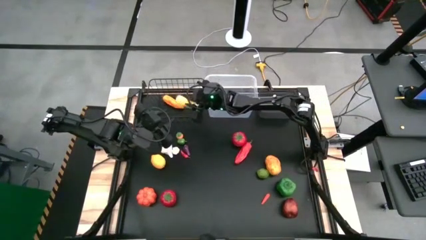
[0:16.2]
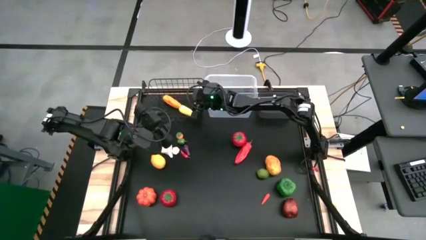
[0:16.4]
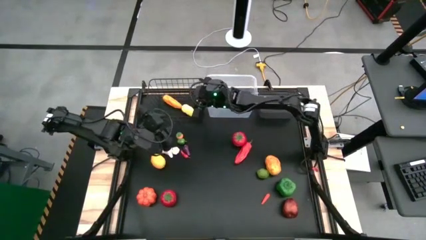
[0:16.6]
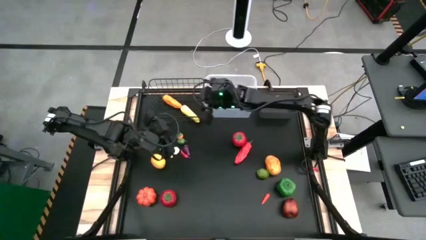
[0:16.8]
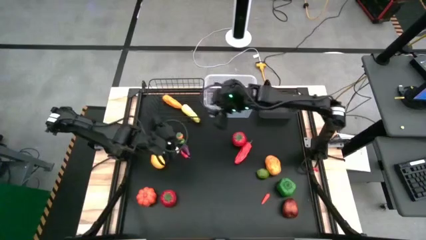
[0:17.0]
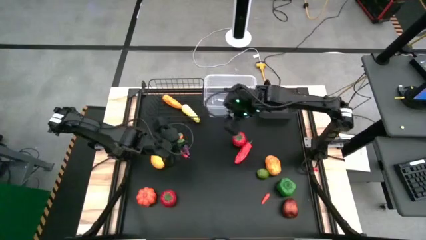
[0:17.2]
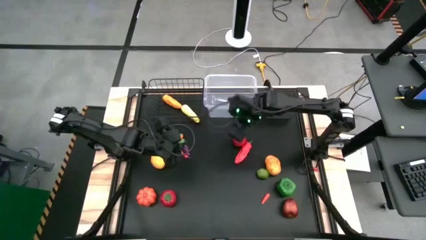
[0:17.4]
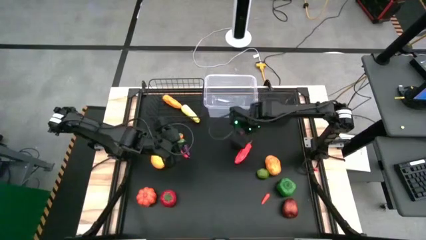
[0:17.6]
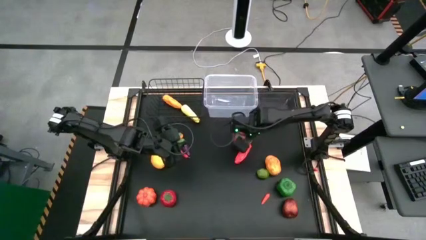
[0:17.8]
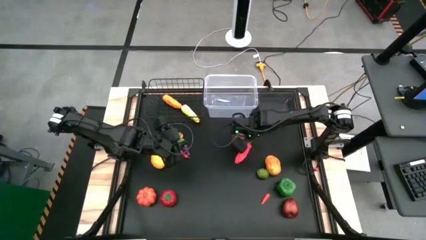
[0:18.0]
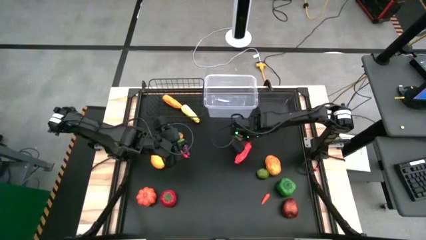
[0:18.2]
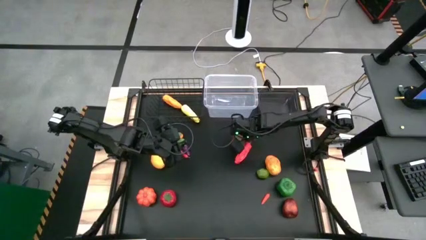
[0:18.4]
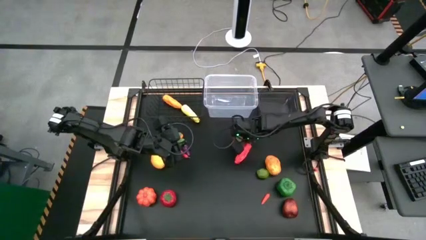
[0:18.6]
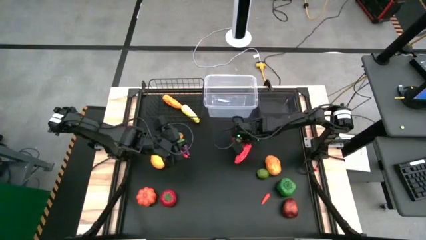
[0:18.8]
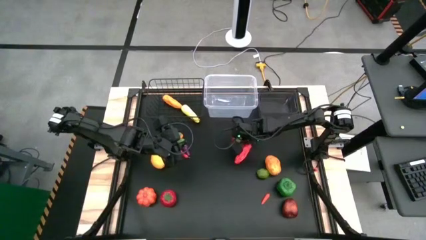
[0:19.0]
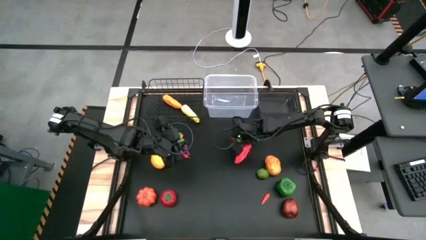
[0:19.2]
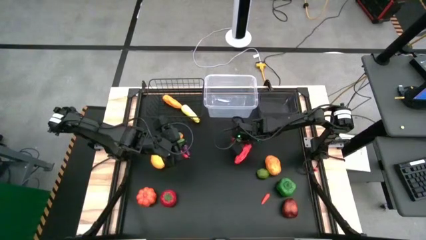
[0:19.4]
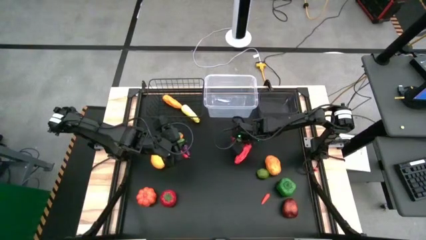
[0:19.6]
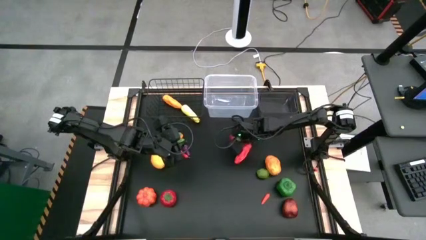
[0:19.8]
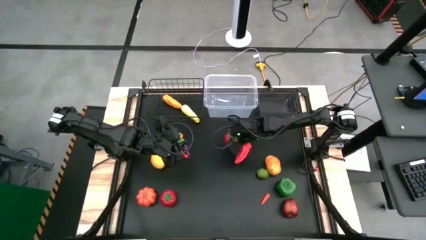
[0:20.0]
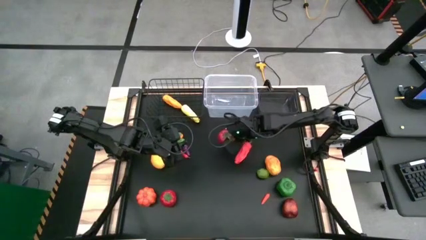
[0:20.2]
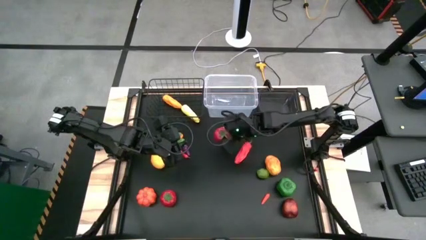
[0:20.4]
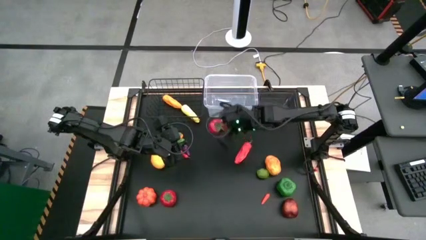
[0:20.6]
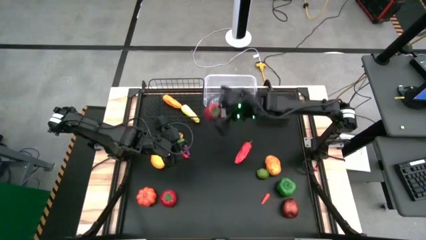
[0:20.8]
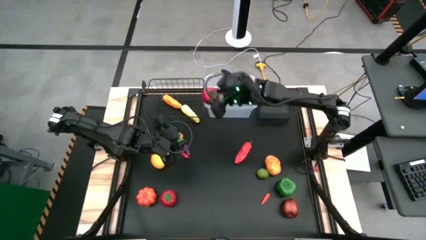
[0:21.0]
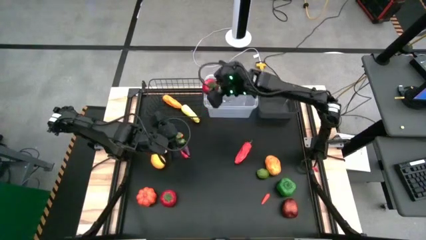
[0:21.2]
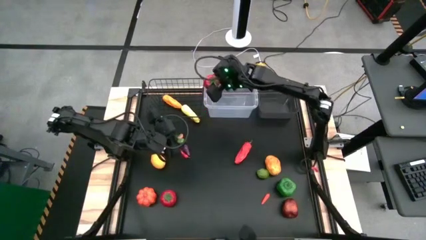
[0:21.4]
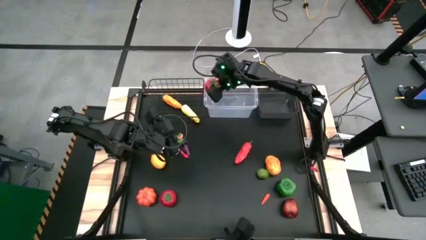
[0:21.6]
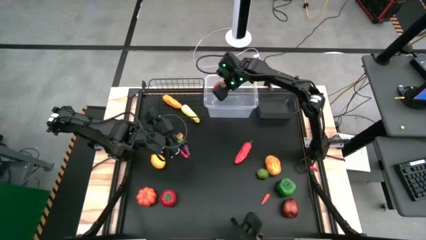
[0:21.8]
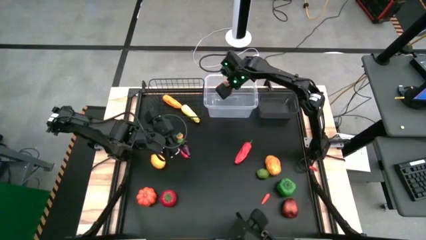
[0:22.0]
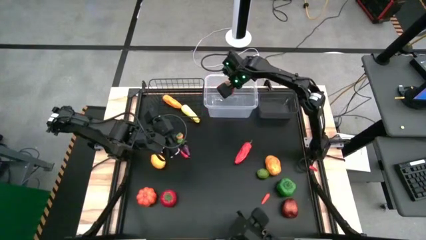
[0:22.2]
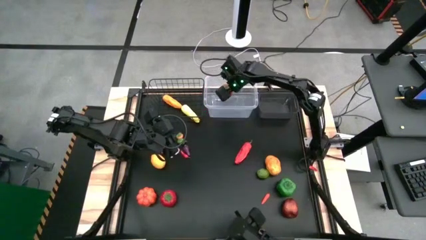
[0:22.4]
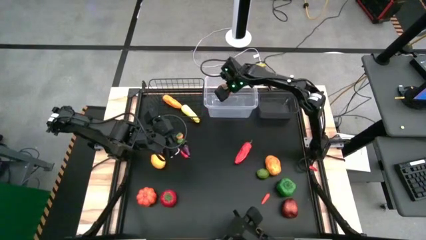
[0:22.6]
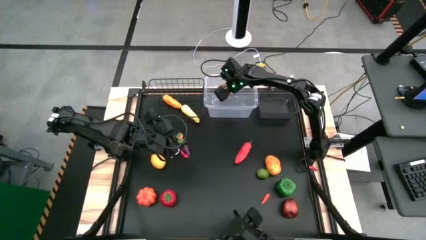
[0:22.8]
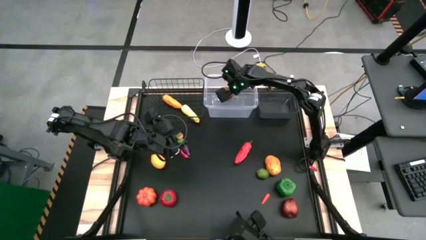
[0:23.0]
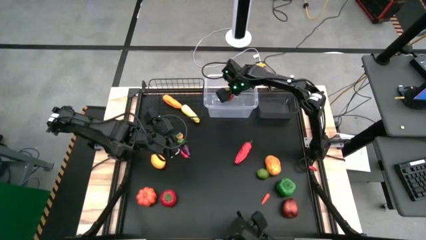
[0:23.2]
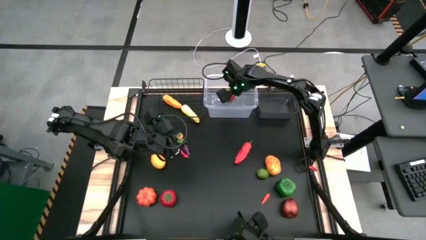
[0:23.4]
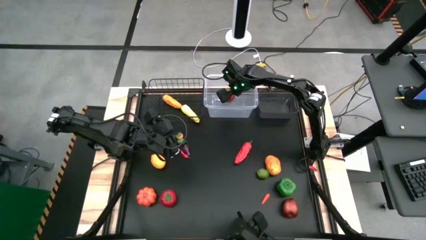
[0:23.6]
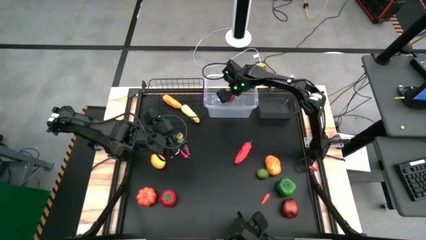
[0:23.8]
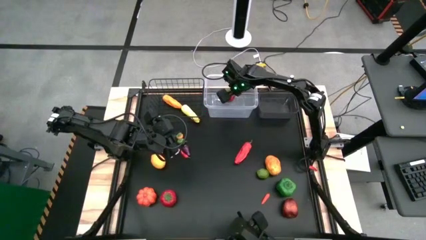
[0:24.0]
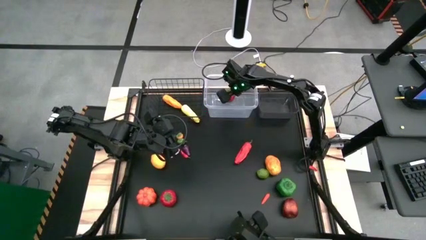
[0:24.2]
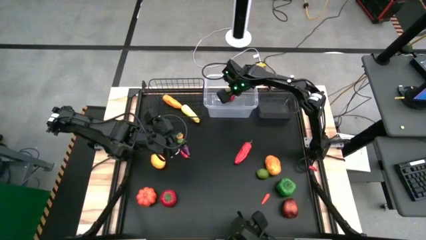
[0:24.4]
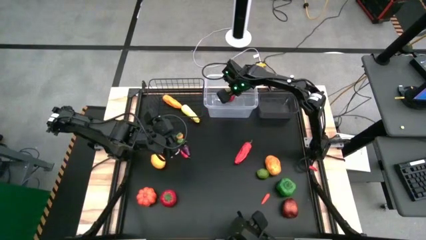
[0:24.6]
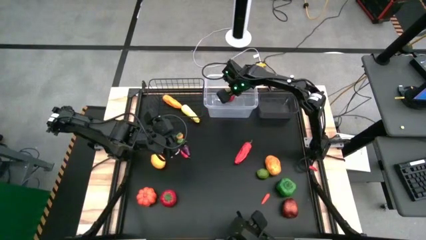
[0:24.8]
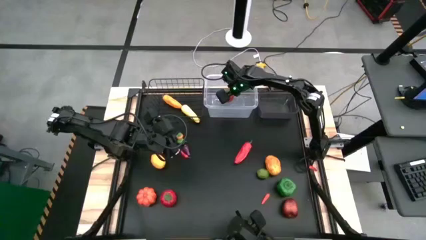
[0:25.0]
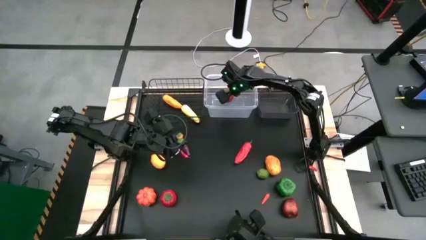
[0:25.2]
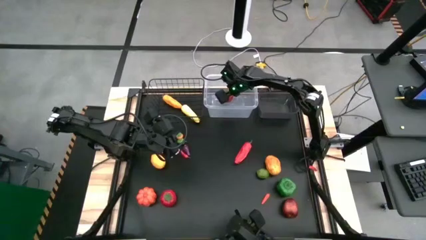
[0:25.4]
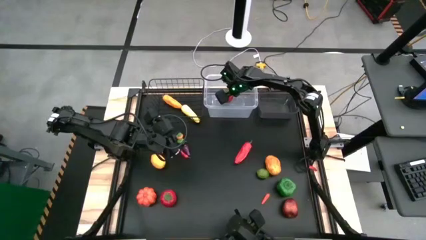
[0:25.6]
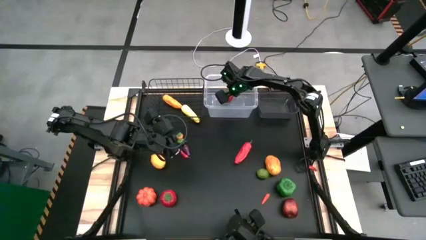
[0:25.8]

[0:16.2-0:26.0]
Task: Sort produce into baskets
Put the top red tomato into the transparent bin

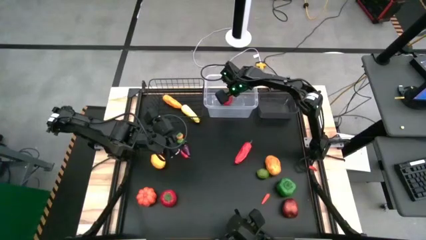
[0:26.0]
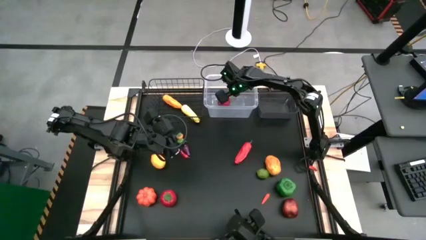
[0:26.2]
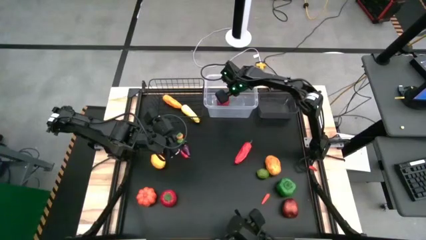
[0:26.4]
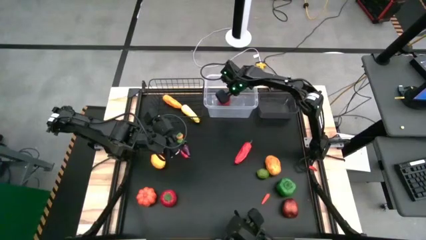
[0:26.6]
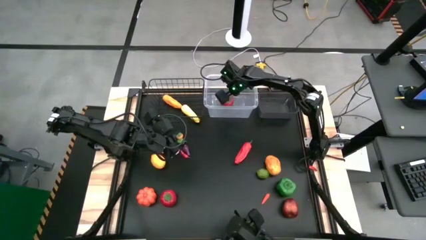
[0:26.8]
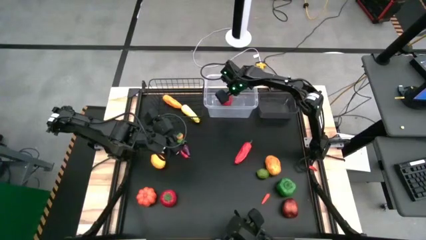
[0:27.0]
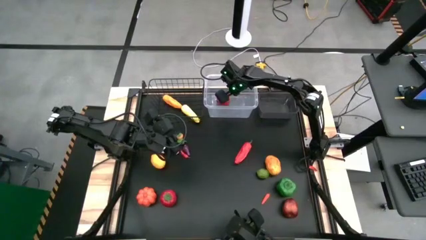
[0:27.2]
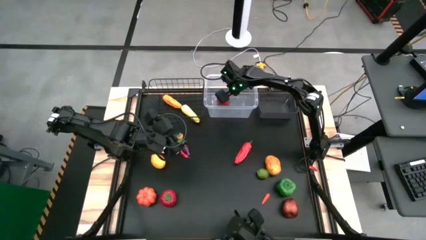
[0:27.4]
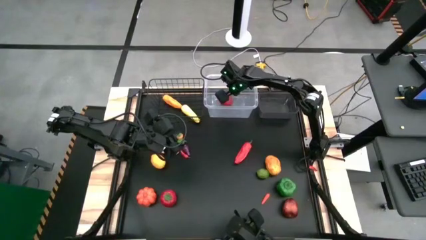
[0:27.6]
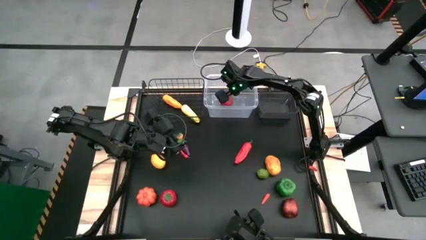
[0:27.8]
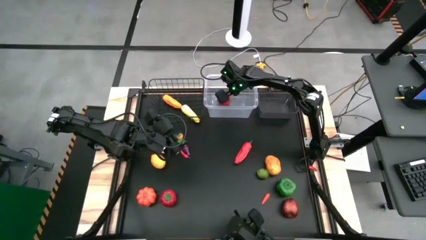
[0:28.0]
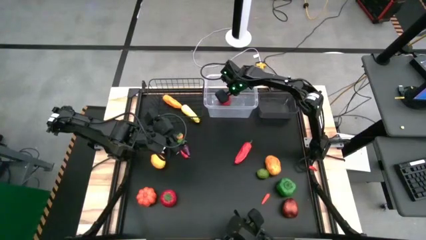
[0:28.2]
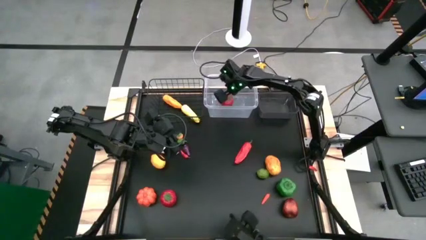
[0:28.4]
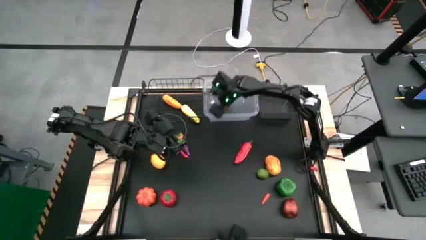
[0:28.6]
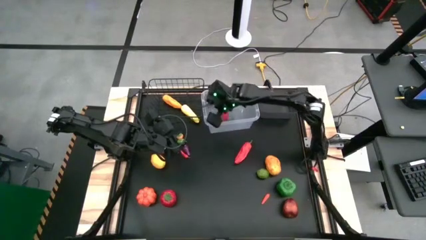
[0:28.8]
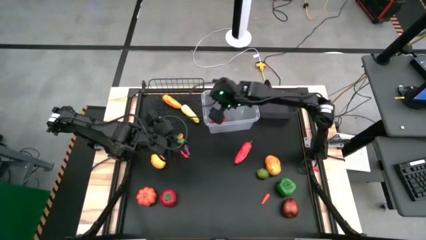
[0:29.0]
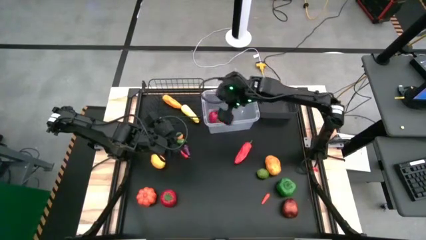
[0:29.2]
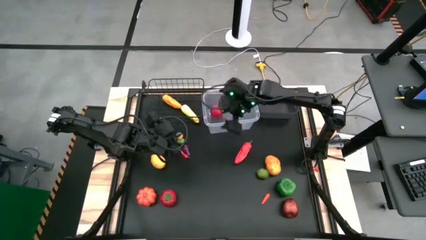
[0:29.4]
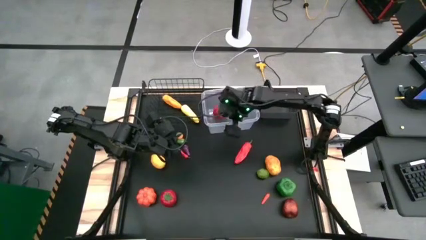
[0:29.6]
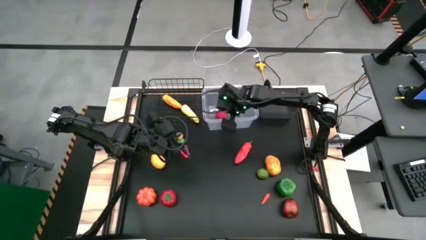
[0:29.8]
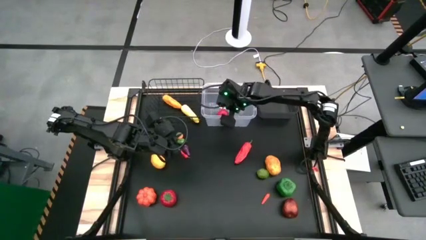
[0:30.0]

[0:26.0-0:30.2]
Adjust the transparent bin

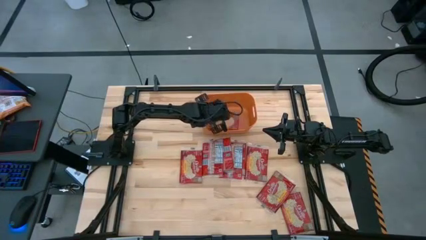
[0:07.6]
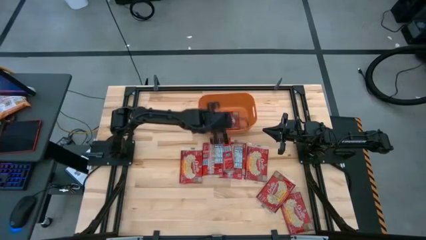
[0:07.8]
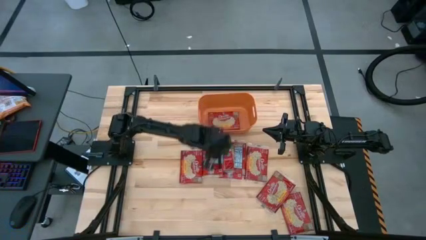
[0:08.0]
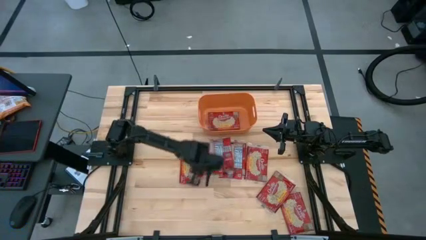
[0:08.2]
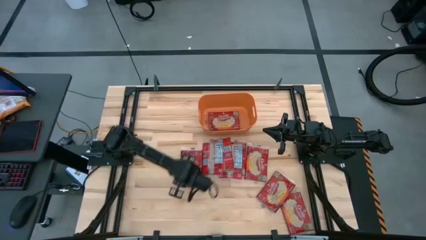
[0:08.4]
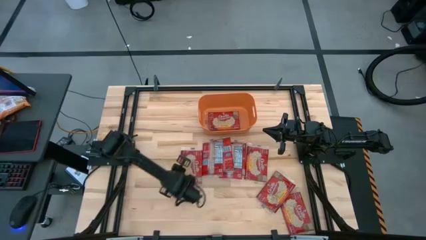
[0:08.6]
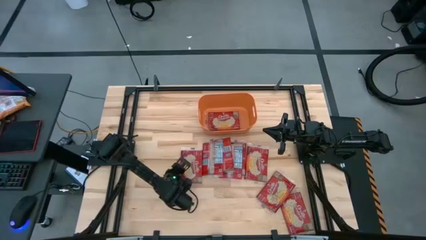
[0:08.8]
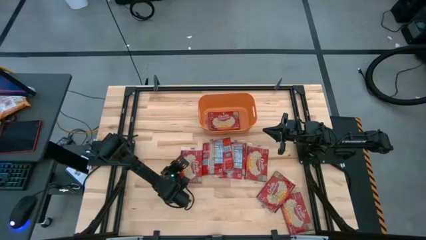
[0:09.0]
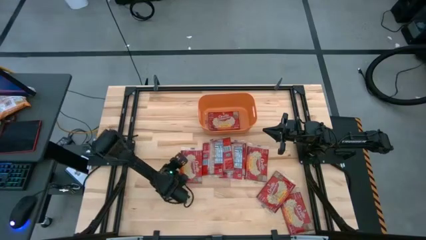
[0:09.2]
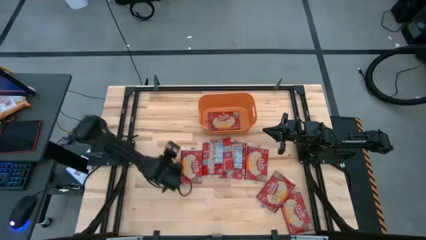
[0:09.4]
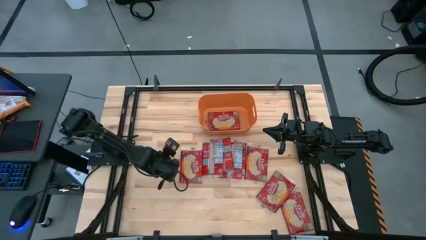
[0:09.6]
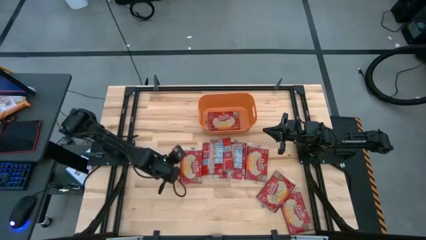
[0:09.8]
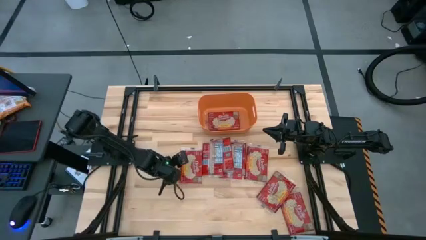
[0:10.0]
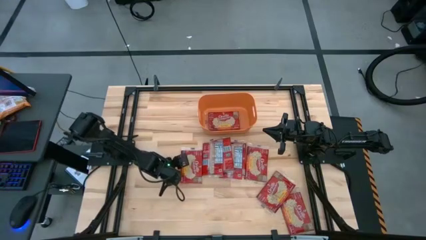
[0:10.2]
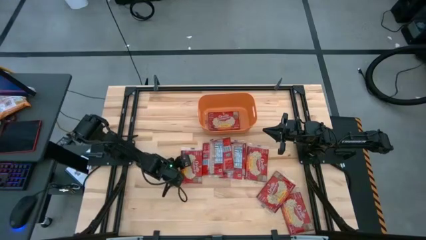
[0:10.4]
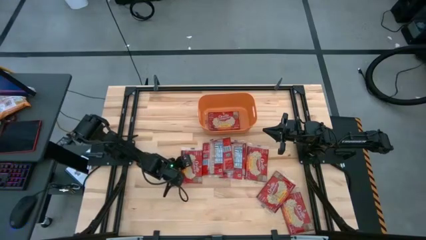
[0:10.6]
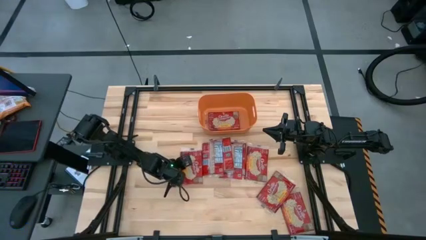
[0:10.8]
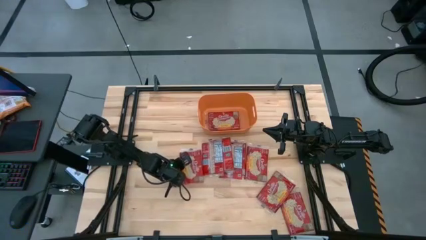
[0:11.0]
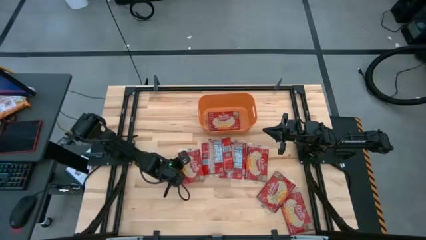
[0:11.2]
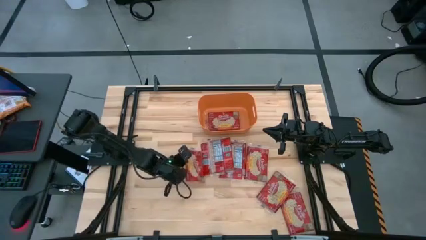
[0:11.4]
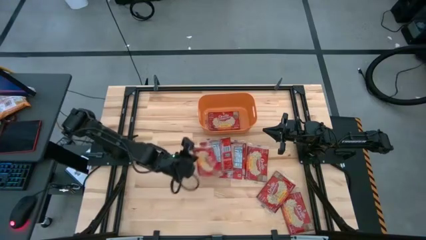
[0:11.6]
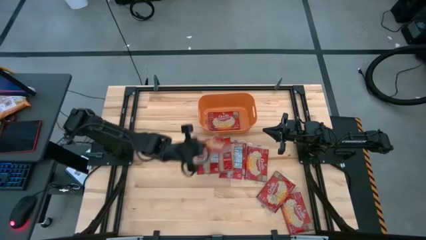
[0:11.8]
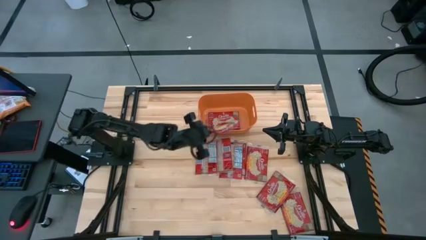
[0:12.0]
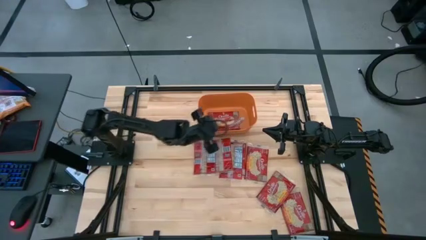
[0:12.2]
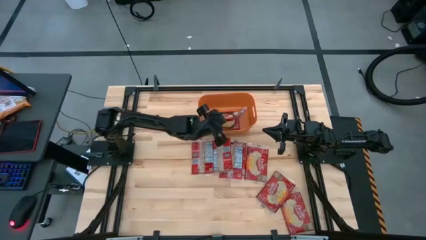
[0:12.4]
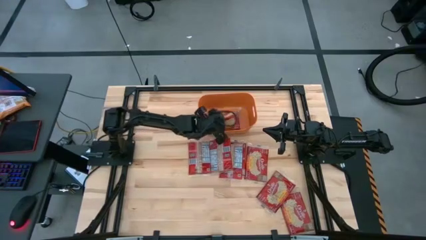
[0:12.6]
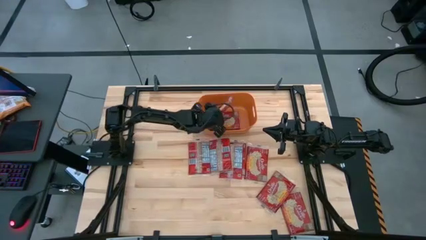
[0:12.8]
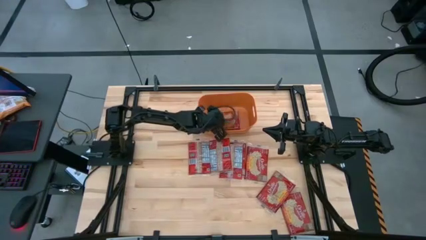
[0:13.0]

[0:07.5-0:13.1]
Task: Sort popcorn bags into baskets
Put the red popcorn bag into the orange bin
